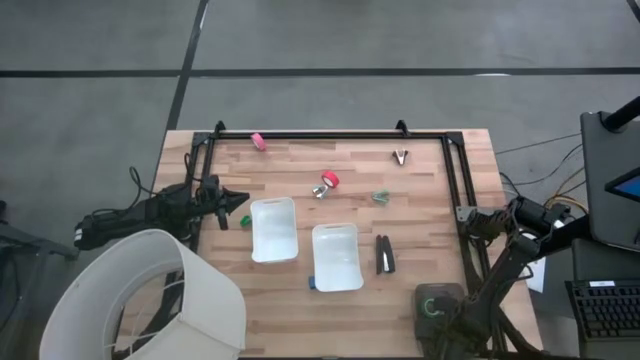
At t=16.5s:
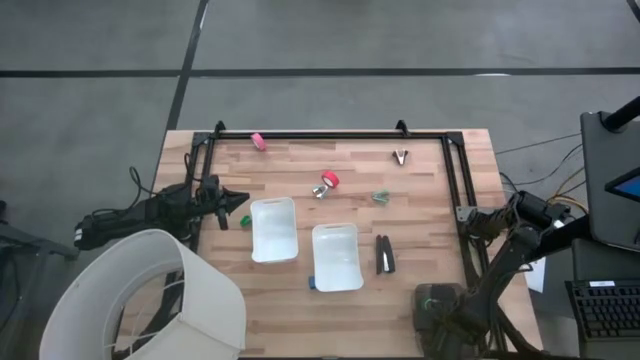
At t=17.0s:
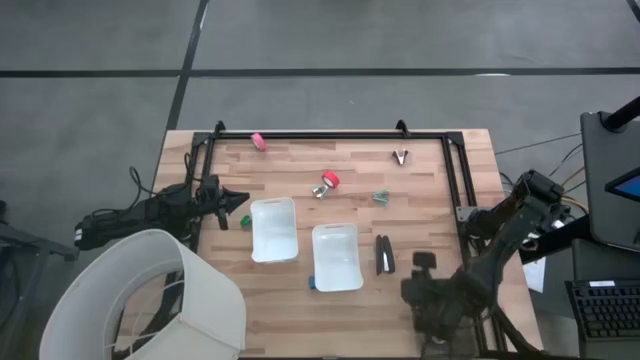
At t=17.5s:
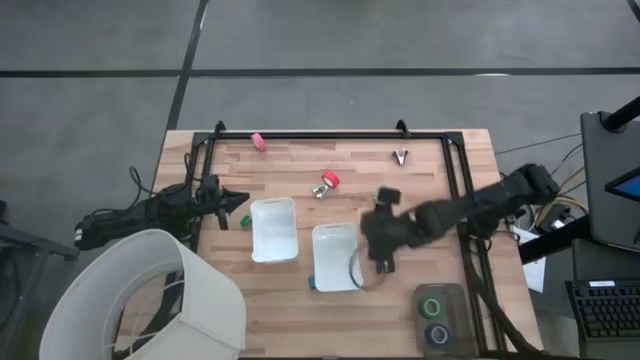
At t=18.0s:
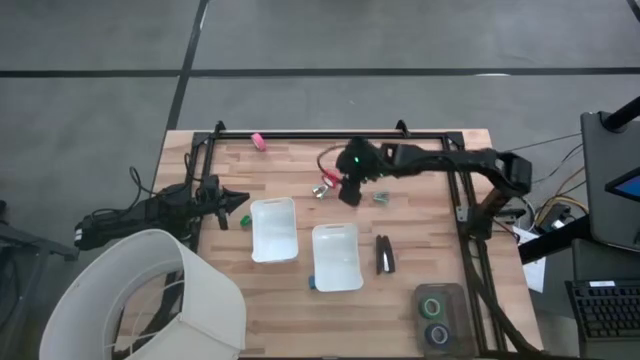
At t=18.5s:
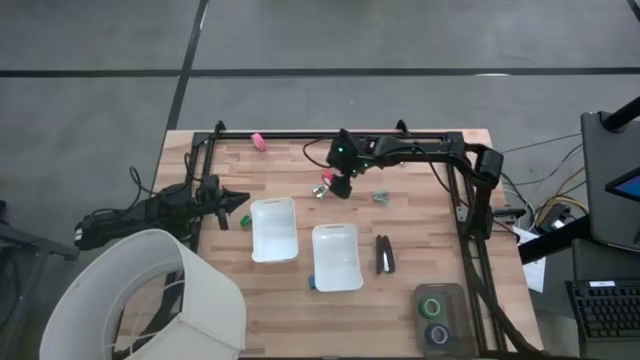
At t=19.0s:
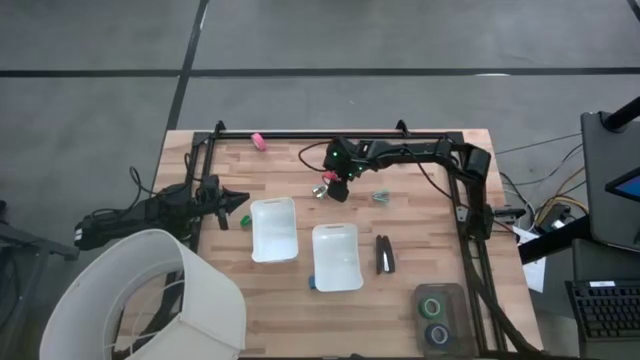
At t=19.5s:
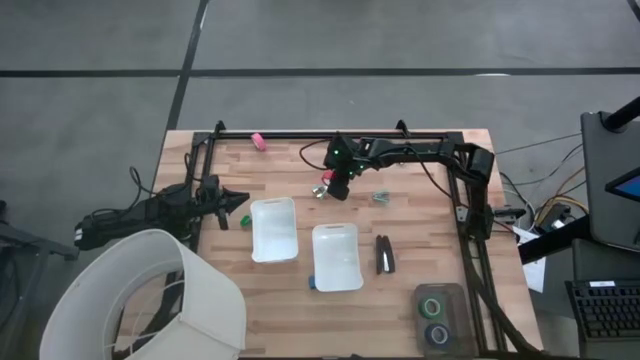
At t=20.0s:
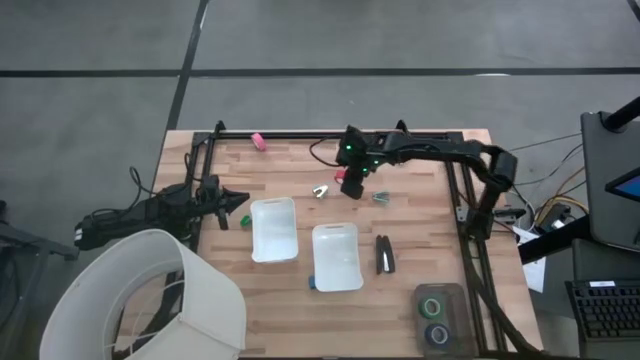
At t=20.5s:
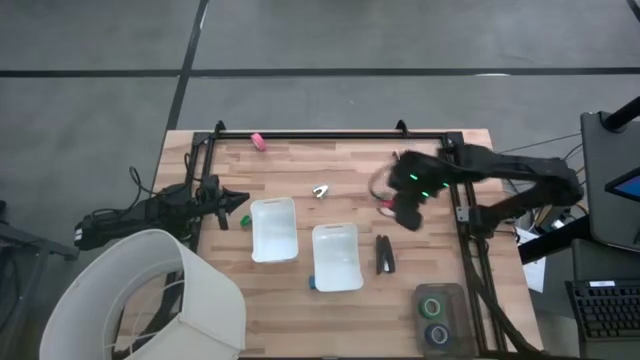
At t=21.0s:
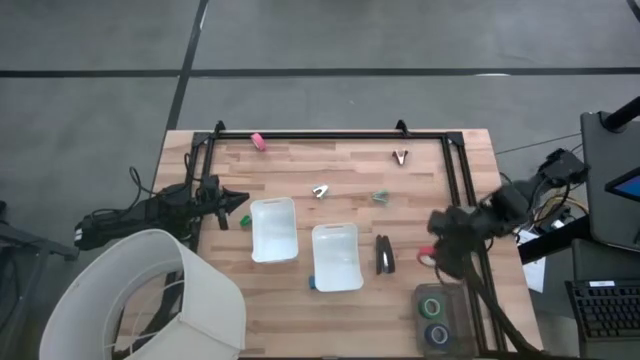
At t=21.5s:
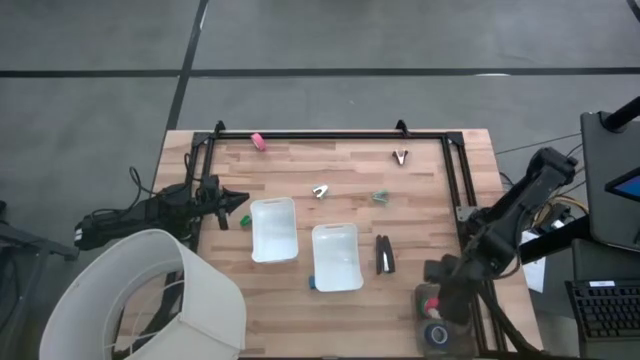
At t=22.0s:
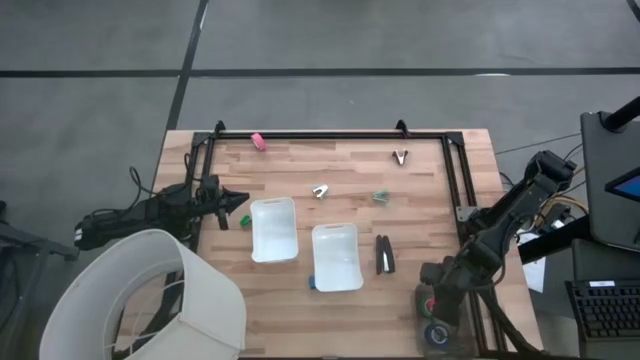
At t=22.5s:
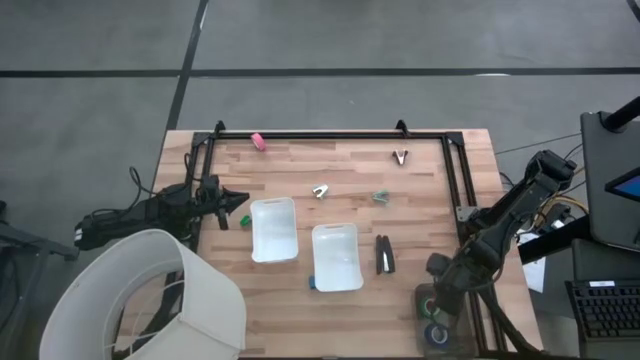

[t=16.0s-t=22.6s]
Task: Pick and place Stapler, Stapler remover, tape
Put the red tape into the black bin

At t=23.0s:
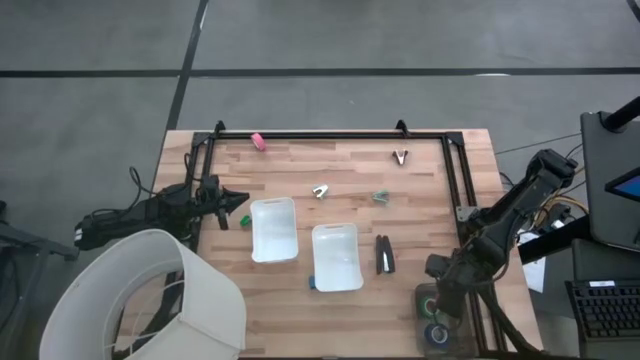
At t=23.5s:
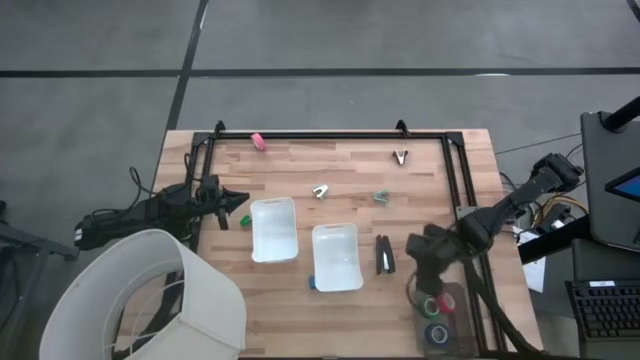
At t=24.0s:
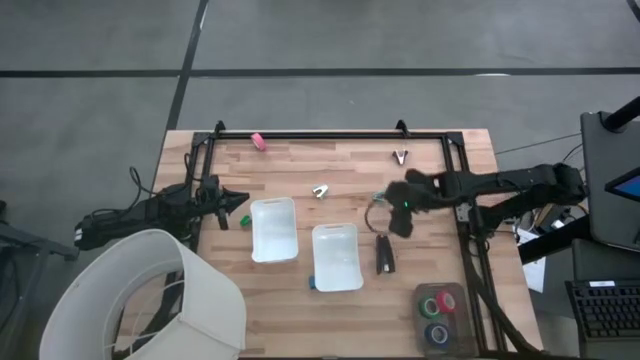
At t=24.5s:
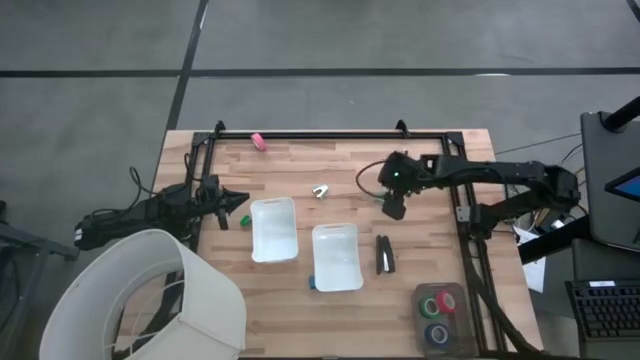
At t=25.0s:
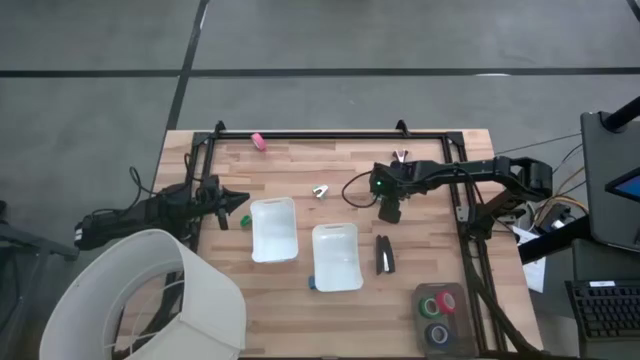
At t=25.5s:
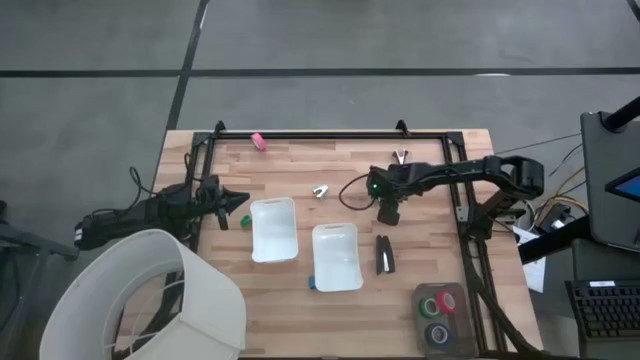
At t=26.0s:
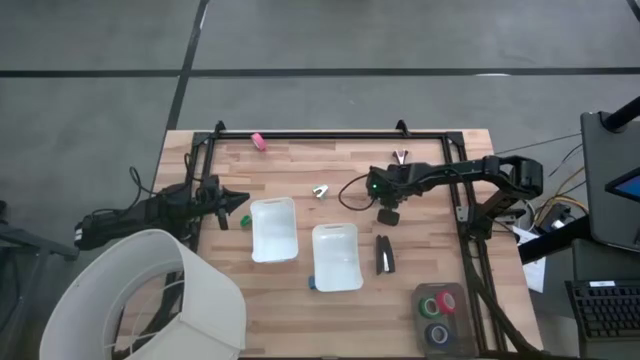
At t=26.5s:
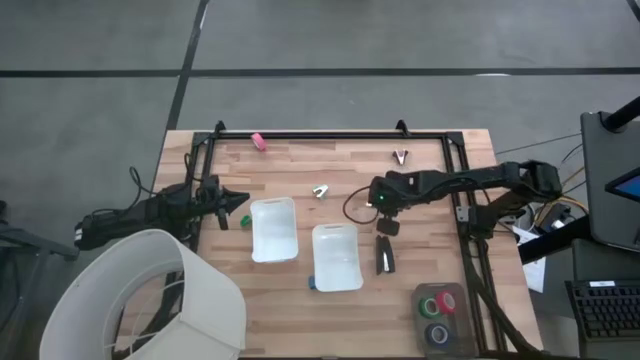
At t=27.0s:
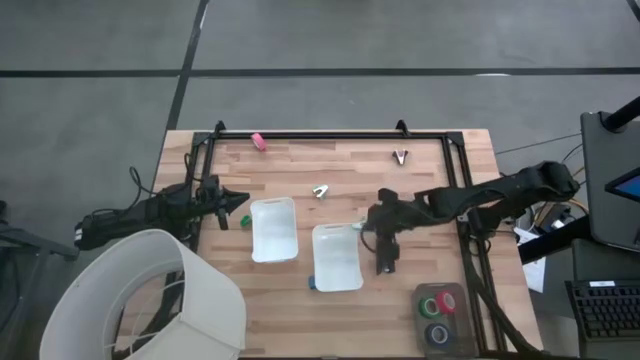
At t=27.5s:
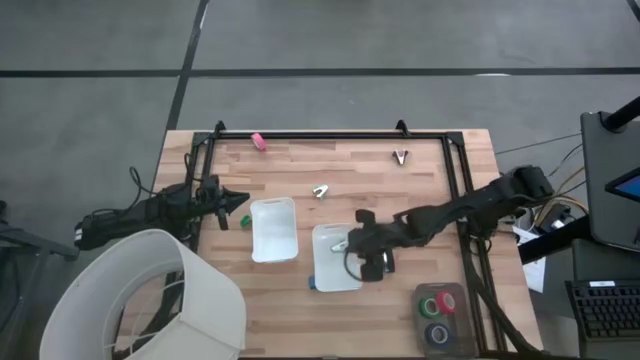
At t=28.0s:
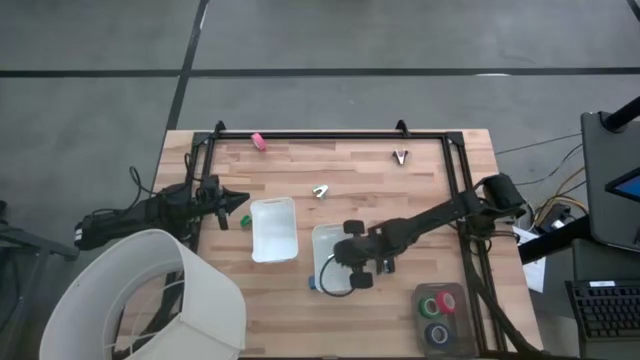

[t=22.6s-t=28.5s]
Put the right light blue staple remover into the right white bin

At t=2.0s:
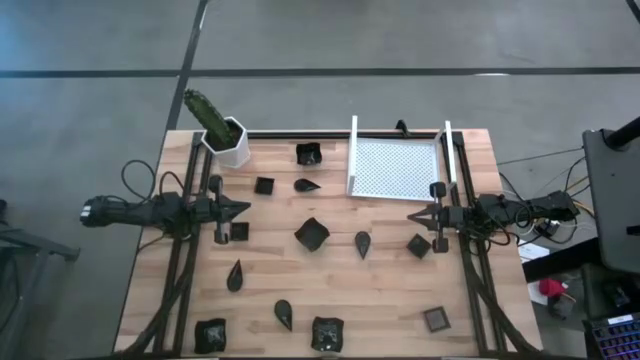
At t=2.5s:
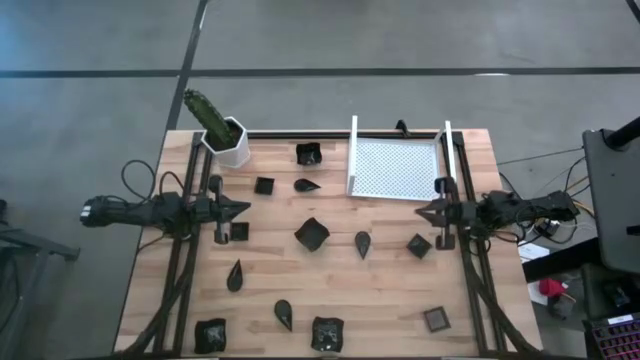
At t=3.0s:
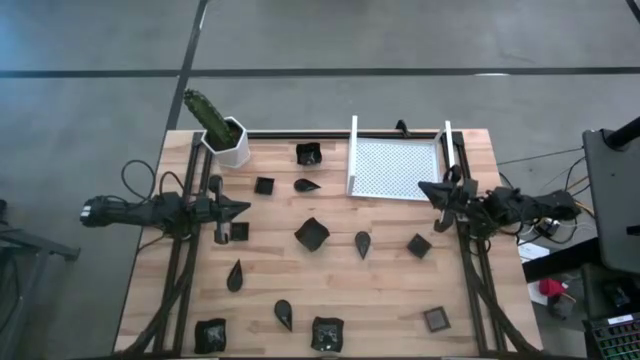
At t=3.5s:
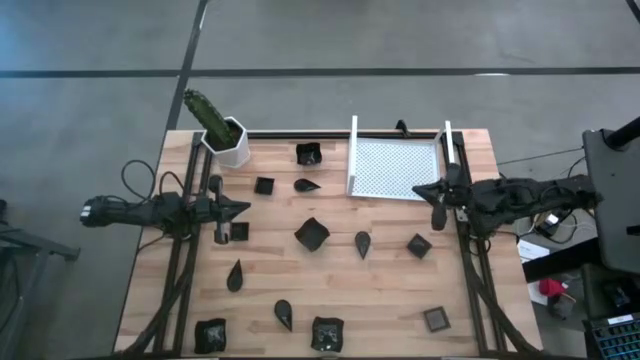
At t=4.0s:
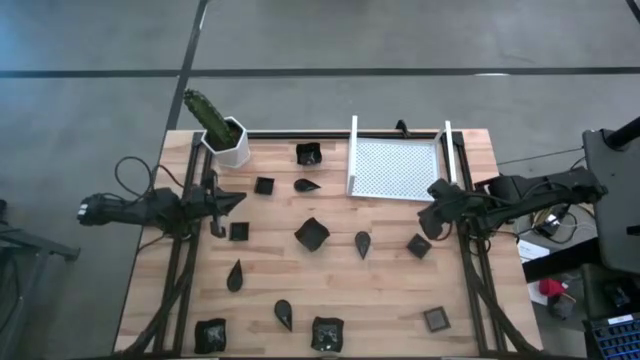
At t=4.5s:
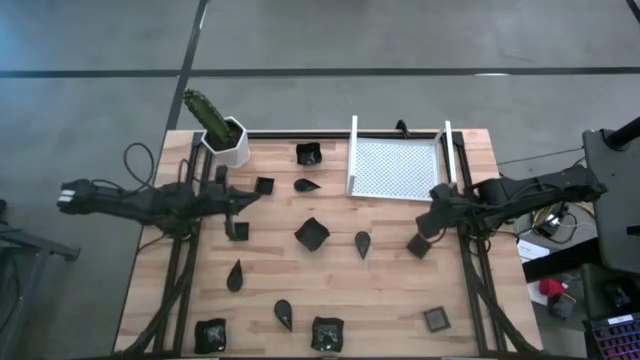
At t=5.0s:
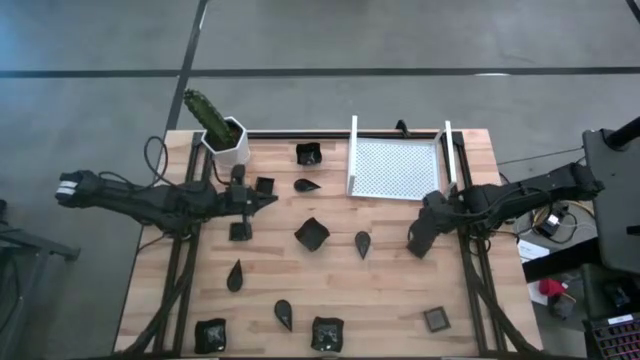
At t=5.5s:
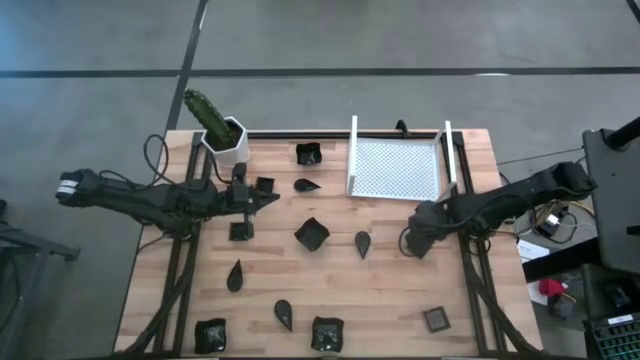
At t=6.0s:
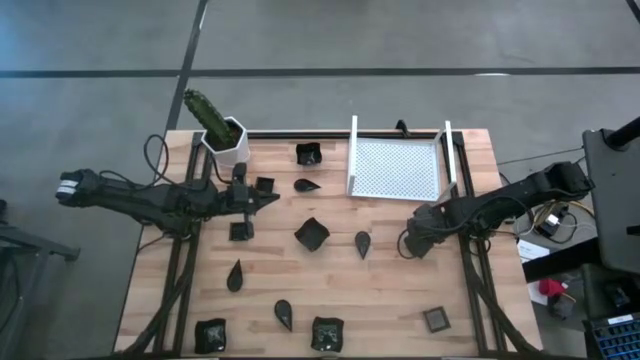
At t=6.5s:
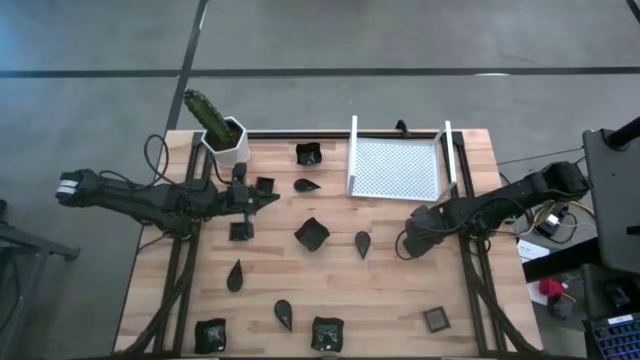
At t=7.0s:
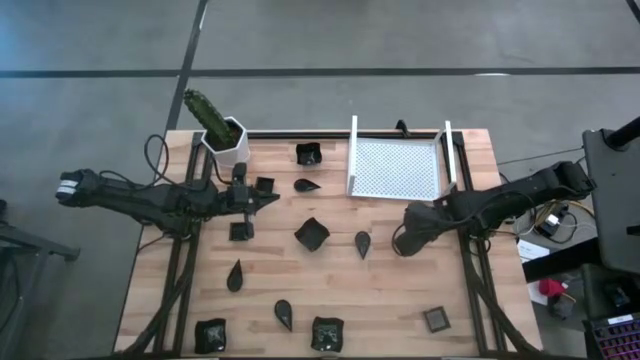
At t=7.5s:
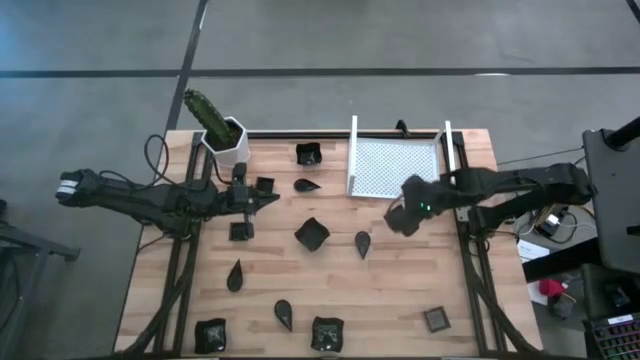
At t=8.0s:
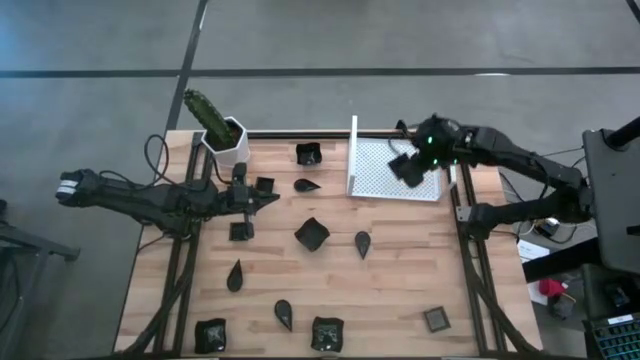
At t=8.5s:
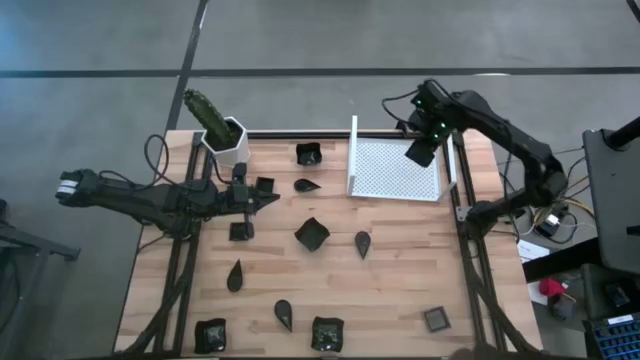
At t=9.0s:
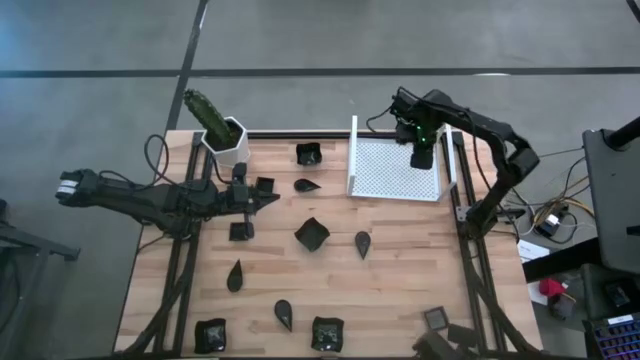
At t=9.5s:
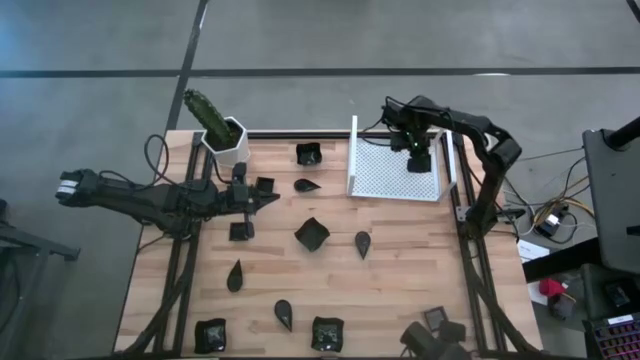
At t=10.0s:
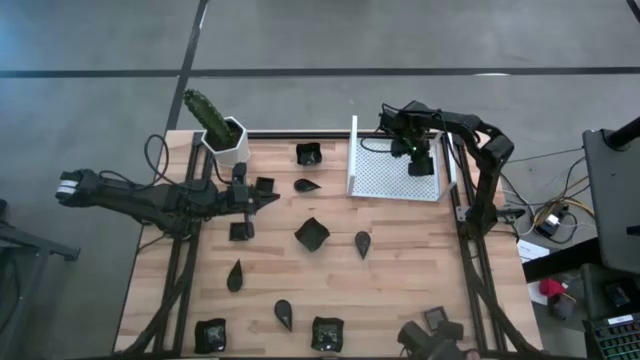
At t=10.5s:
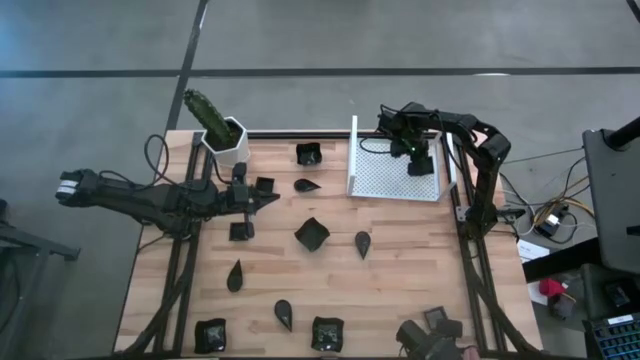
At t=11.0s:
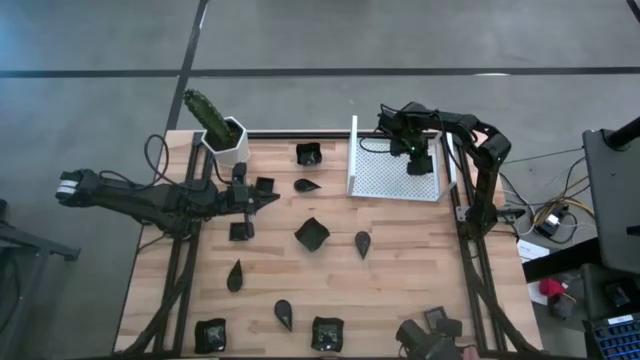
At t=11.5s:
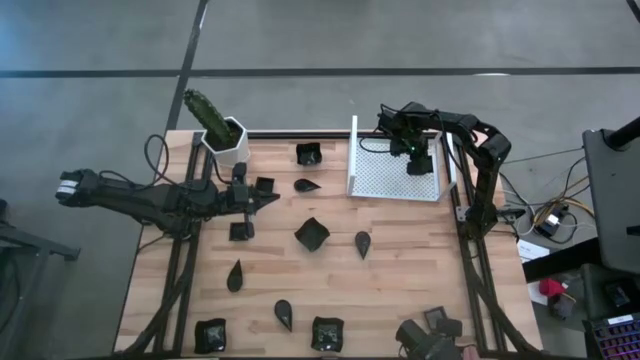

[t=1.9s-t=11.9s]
Task: Pick & Place Mini shaped plates
Put the black square plate on the shelf
